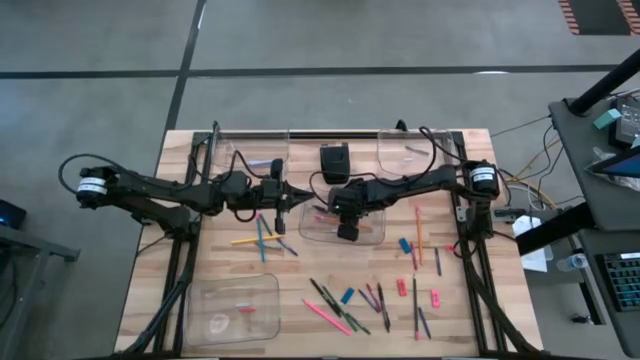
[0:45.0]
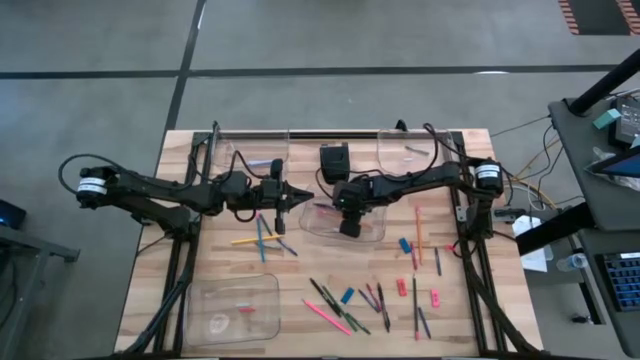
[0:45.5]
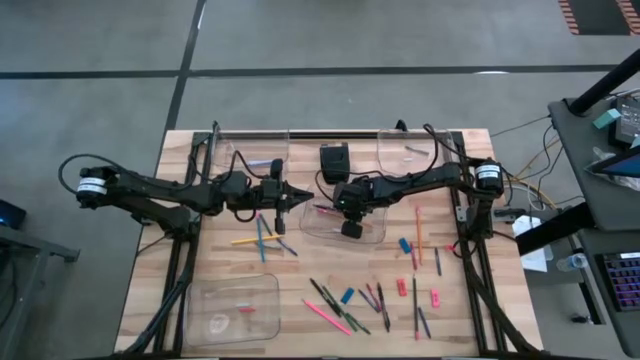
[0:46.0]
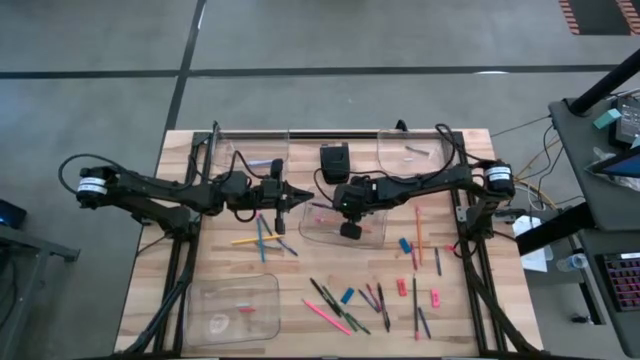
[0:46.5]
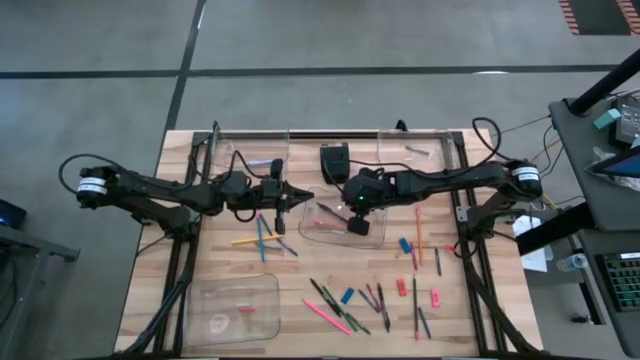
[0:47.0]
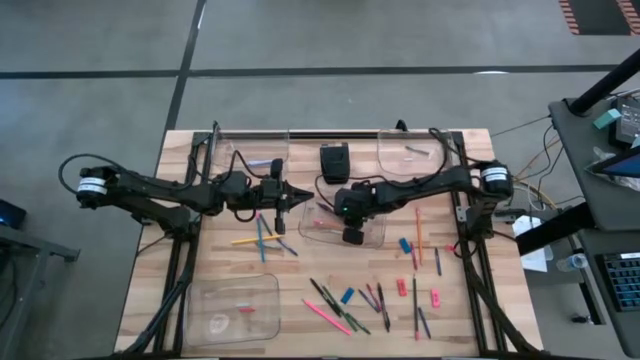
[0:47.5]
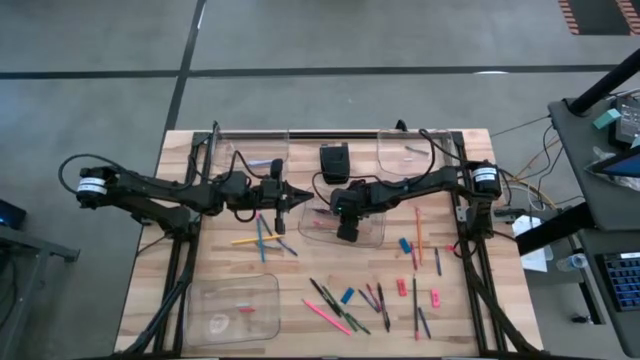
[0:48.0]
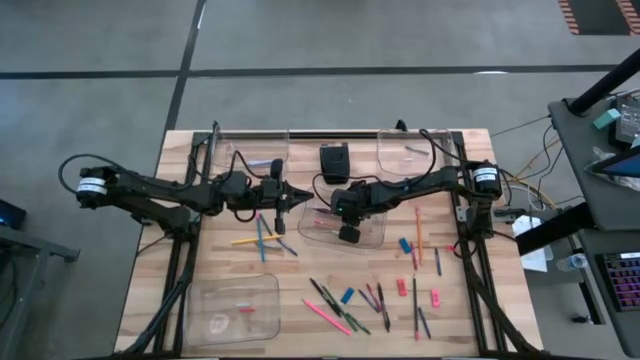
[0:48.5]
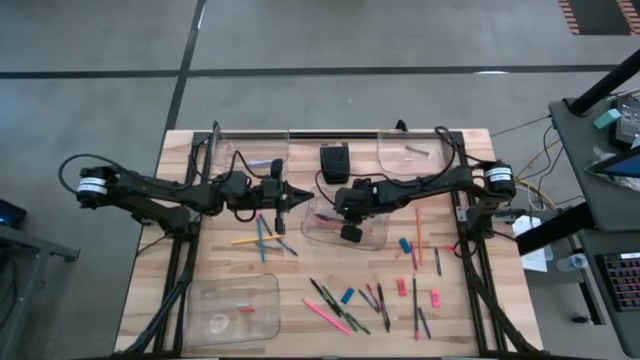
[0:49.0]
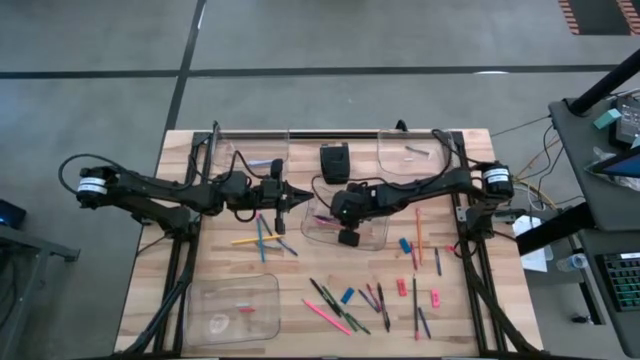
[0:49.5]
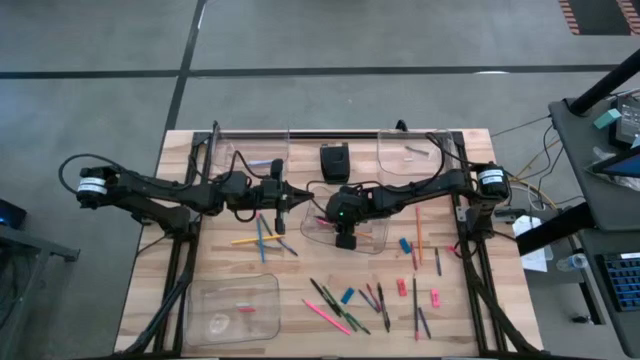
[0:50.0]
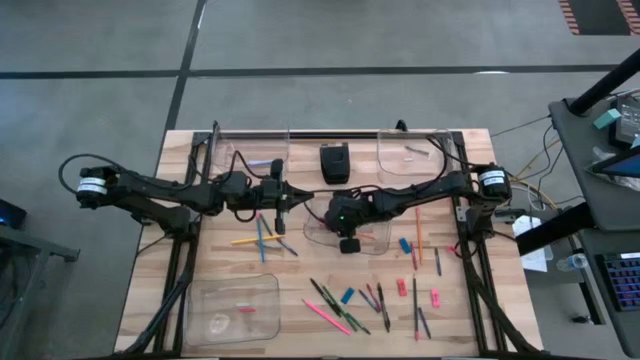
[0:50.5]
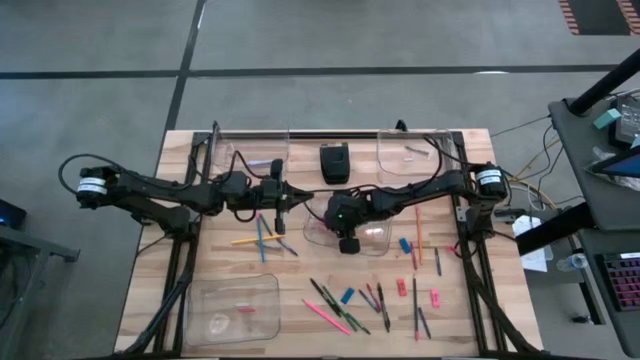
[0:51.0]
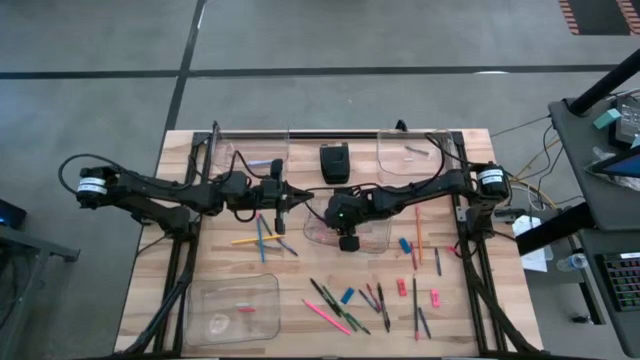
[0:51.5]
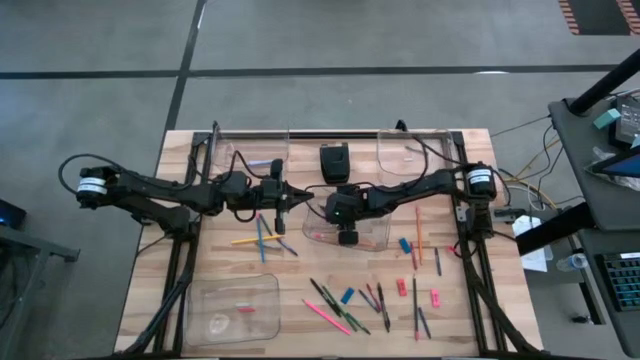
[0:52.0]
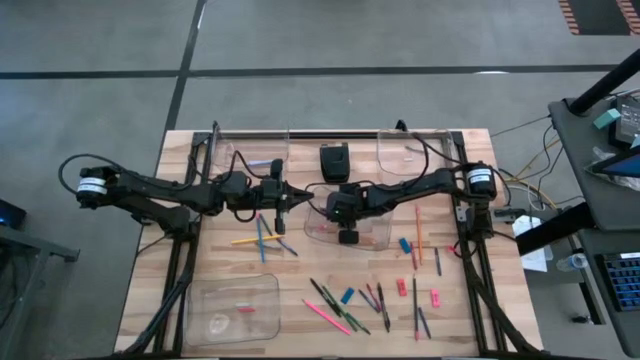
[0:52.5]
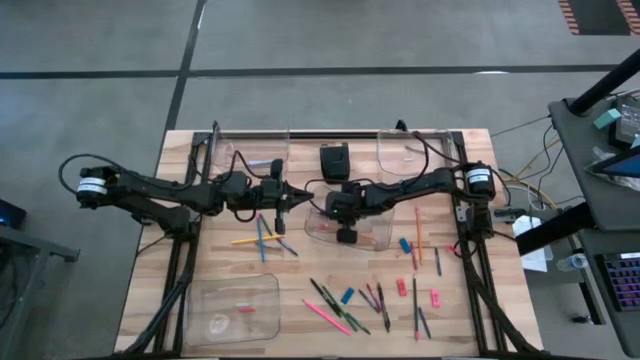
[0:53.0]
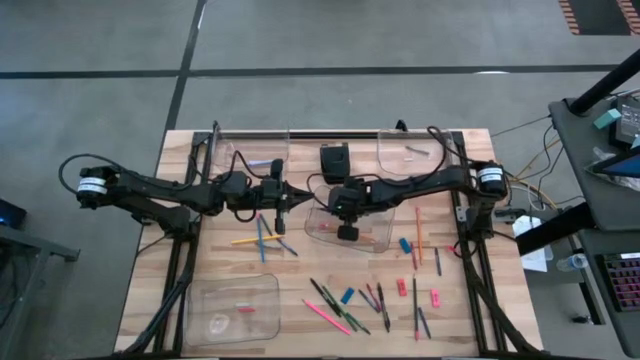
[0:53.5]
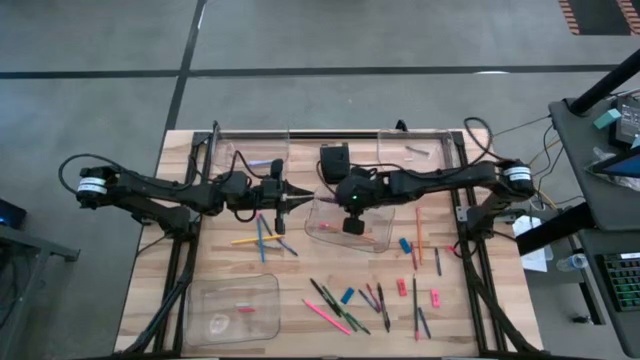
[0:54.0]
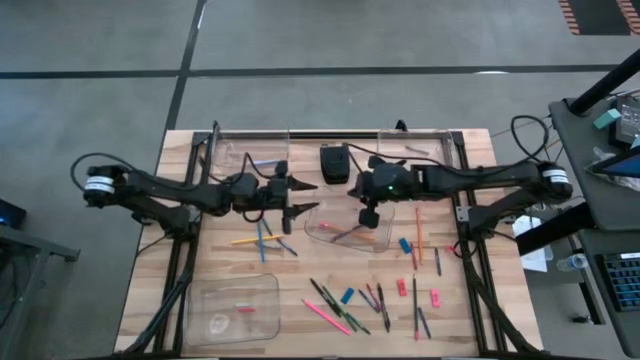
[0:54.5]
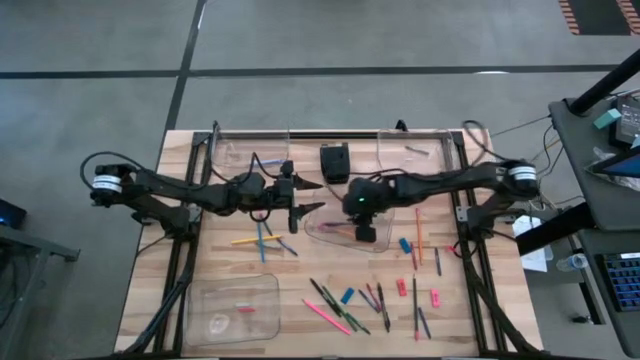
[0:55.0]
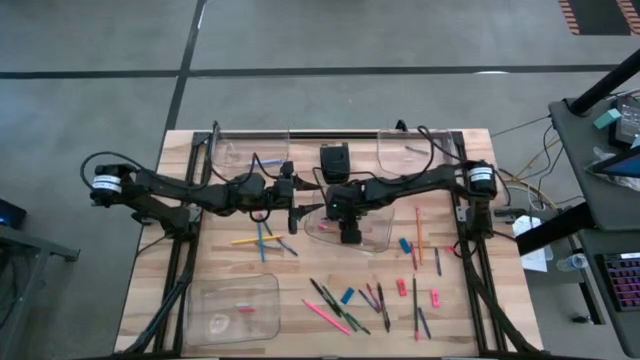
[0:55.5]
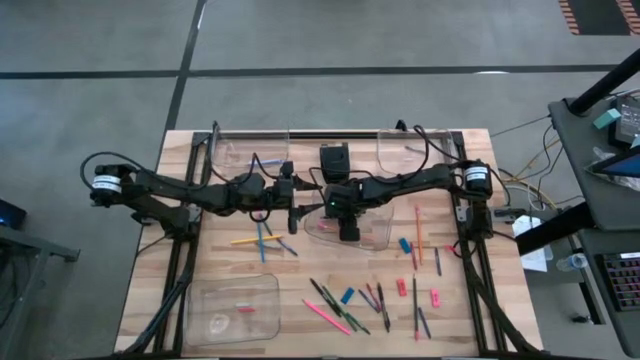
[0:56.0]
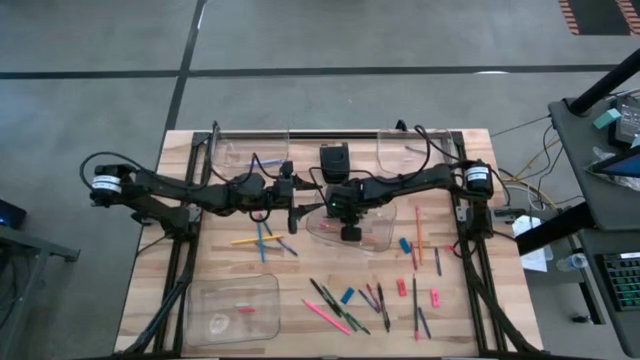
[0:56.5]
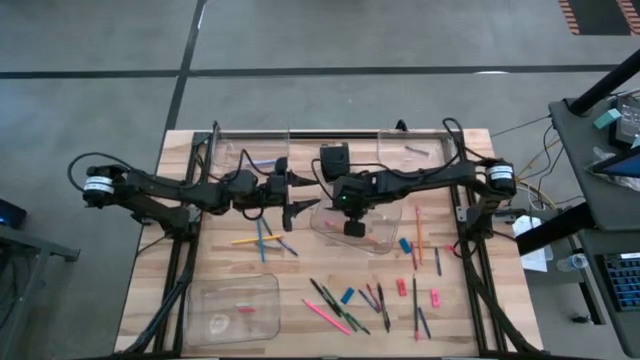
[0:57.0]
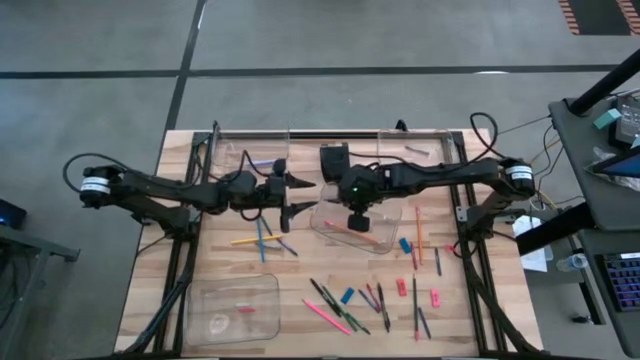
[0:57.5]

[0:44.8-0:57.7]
Task: Sort crayons/erasers/pens/pencils in bins
Put the violet pen into the top left transparent bin

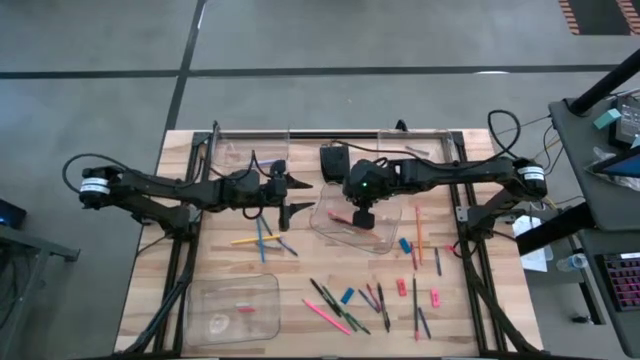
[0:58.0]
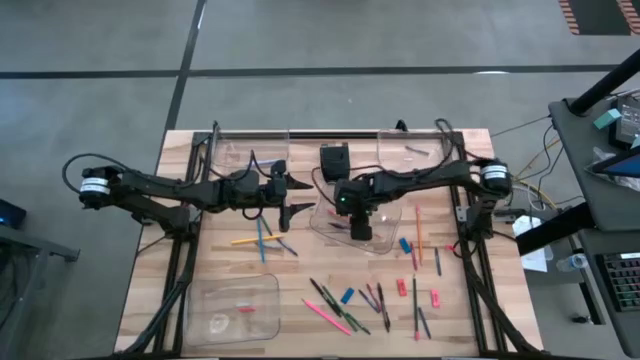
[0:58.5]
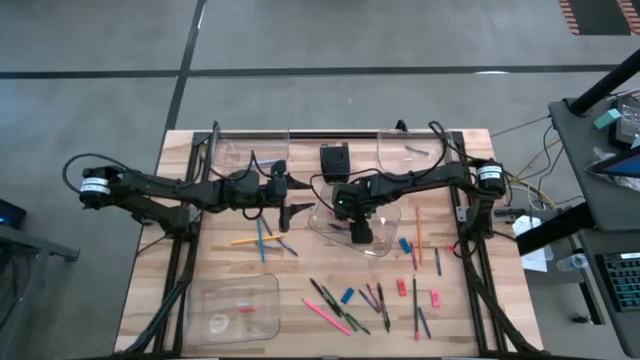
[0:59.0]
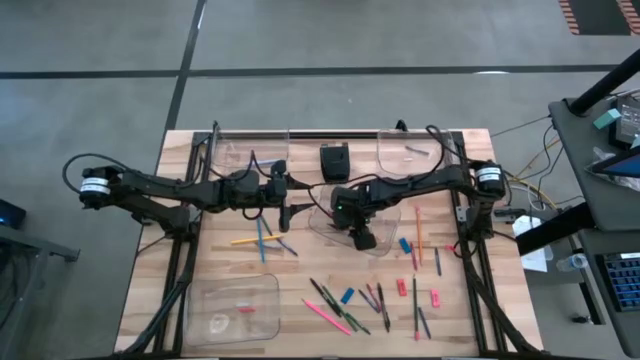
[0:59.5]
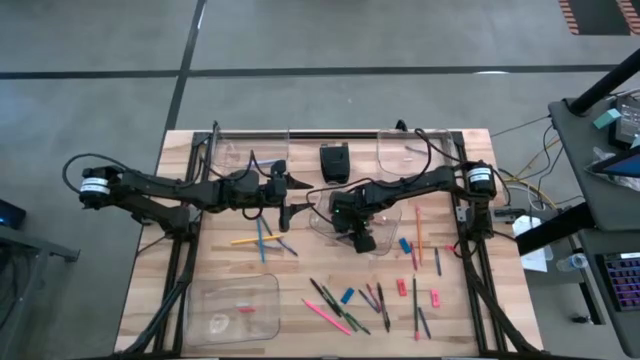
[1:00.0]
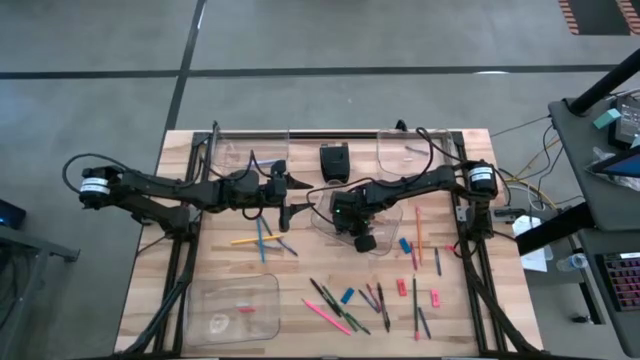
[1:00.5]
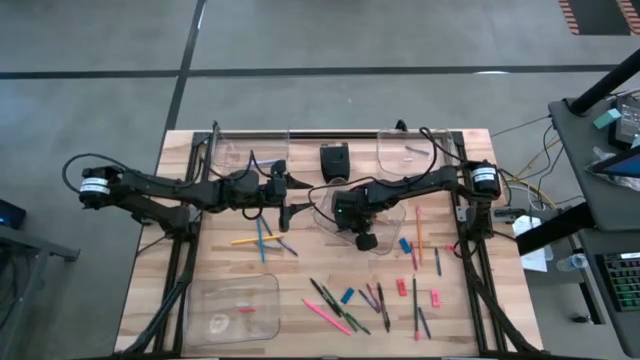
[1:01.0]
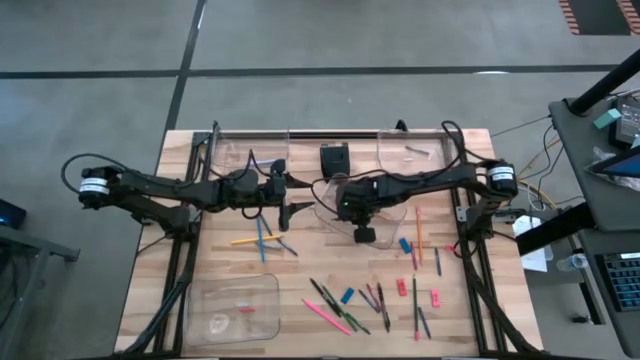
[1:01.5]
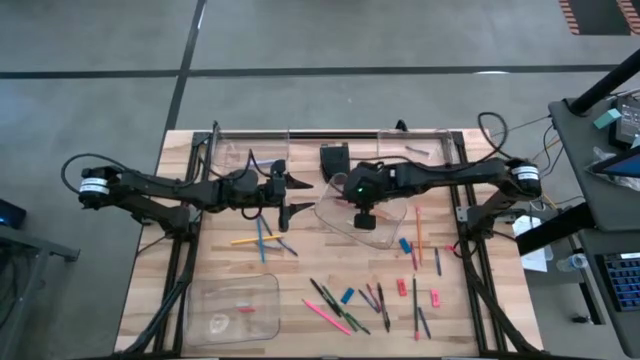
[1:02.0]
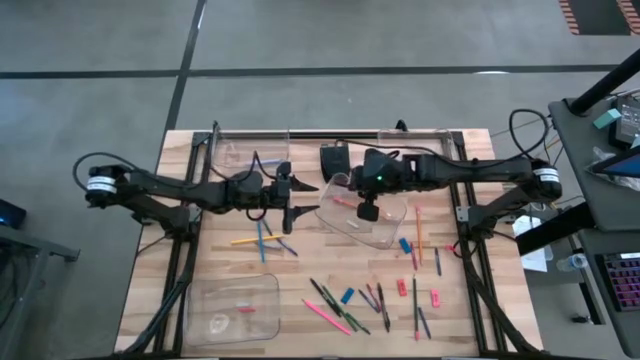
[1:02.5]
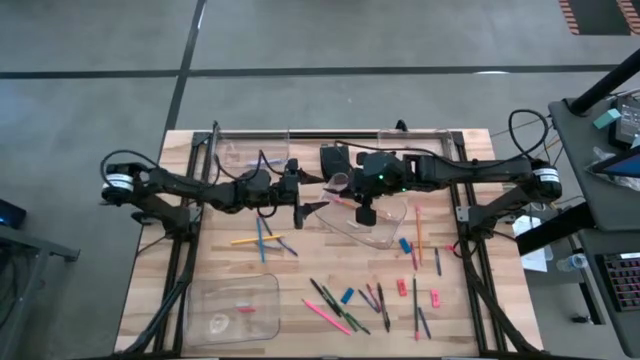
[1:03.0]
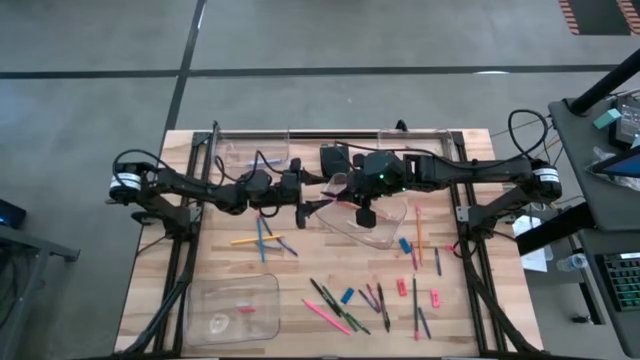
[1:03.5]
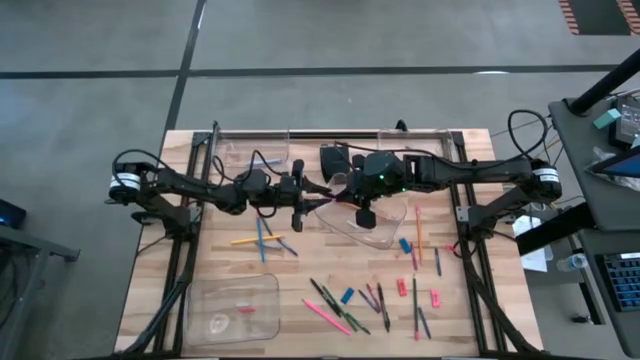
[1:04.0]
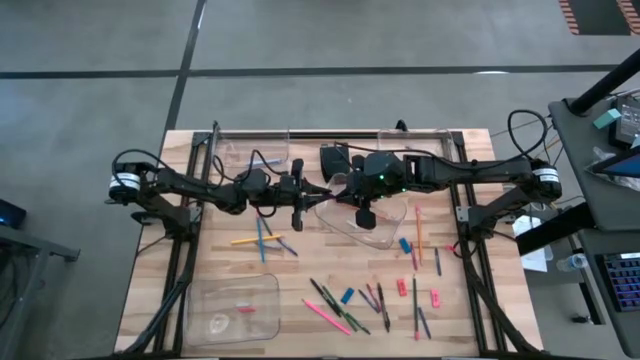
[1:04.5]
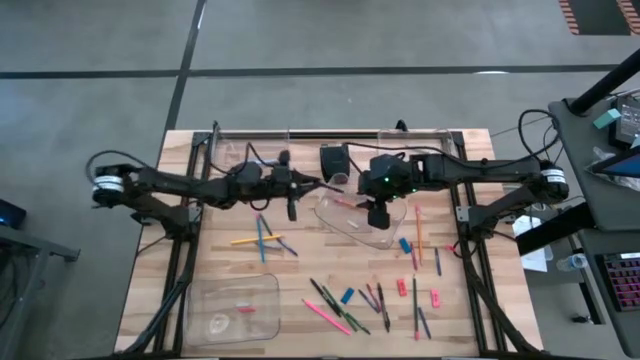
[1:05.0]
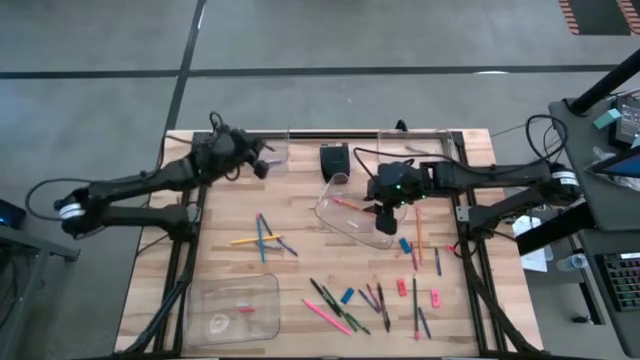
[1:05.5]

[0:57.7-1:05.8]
Put the violet pen into the top left transparent bin

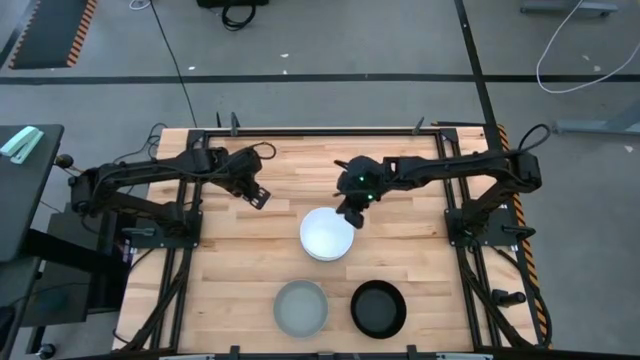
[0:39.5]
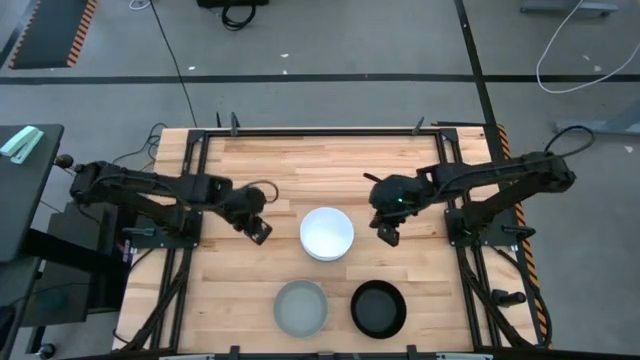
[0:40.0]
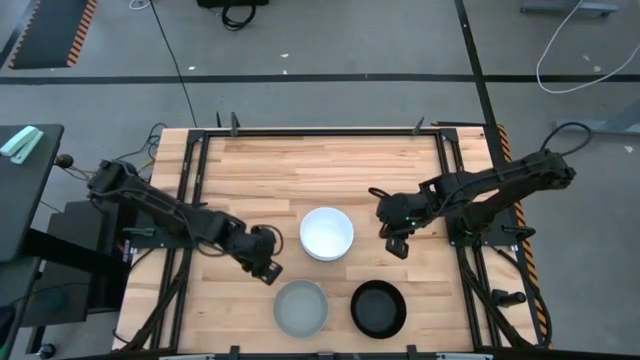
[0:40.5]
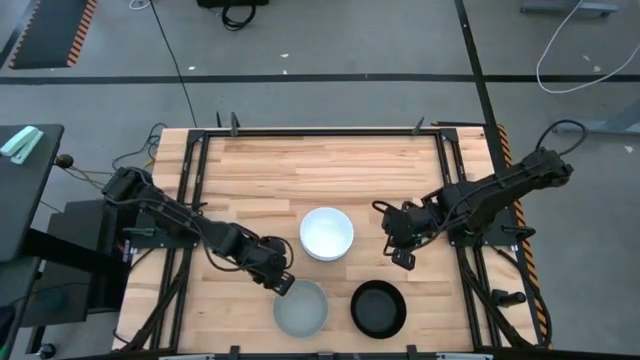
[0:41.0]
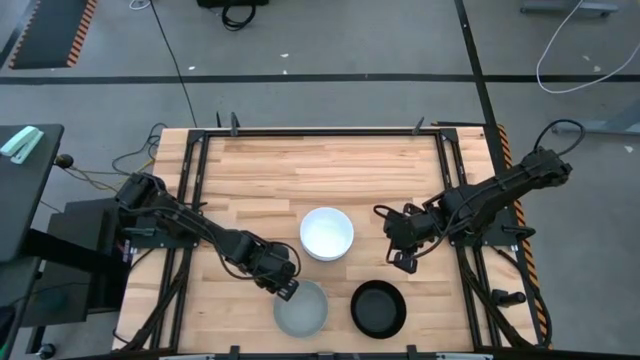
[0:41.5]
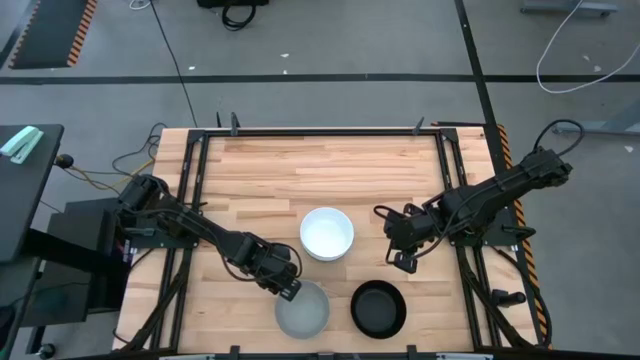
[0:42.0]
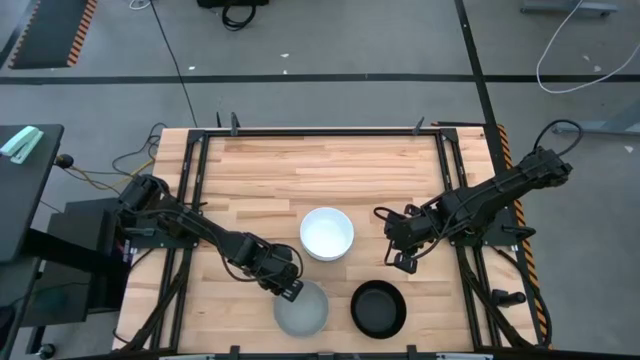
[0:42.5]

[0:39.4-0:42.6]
Task: Nest bowls inside each other
Stack the gray bowl on the white bowl
